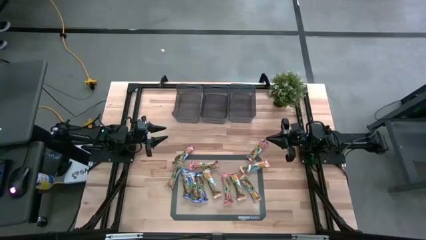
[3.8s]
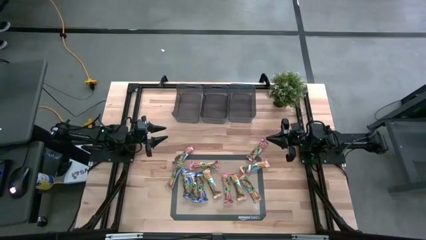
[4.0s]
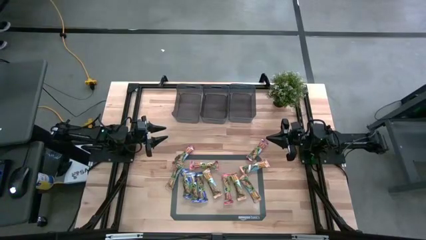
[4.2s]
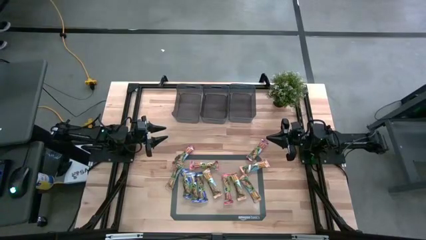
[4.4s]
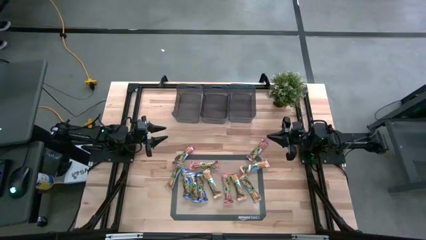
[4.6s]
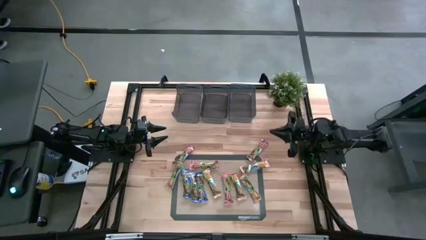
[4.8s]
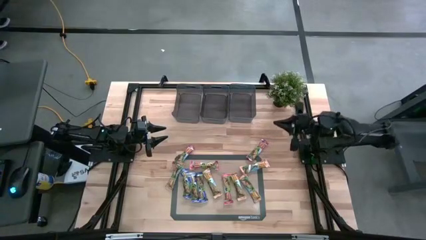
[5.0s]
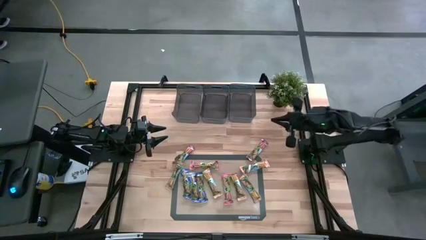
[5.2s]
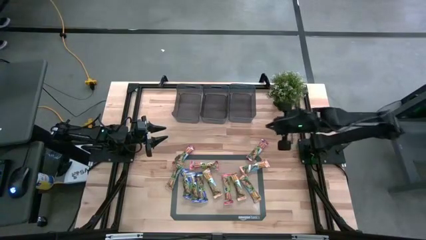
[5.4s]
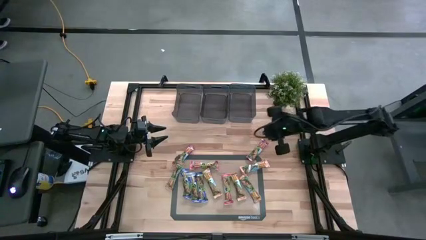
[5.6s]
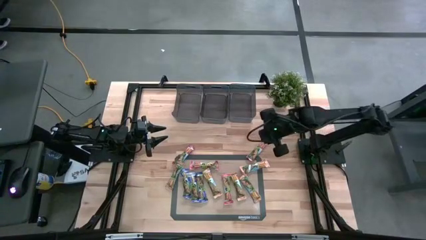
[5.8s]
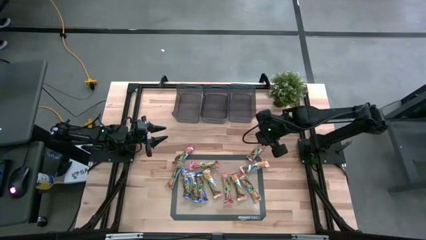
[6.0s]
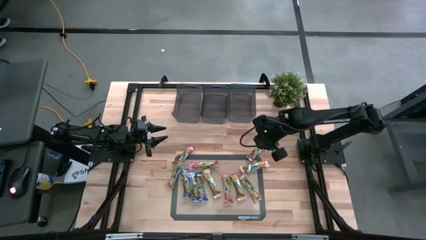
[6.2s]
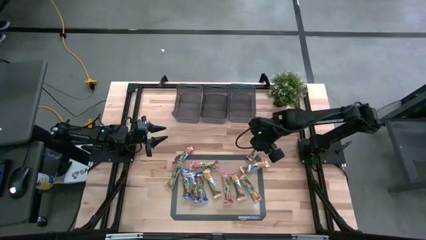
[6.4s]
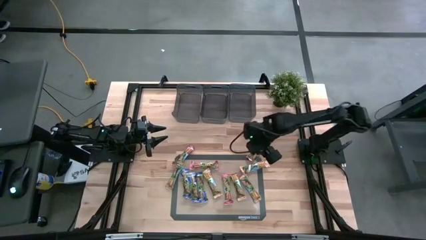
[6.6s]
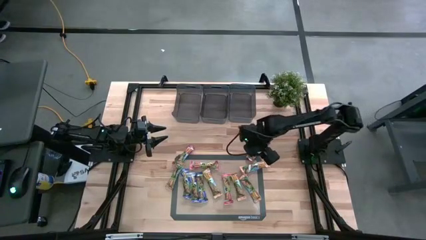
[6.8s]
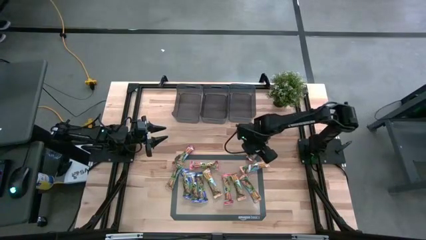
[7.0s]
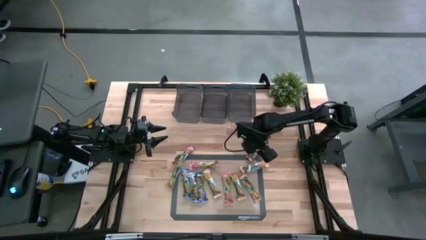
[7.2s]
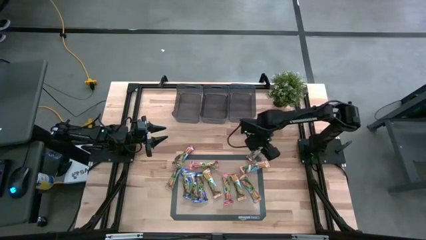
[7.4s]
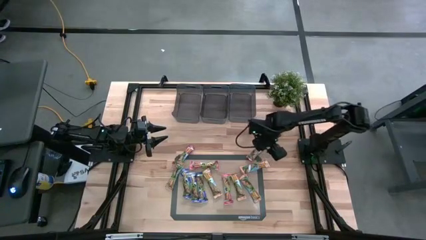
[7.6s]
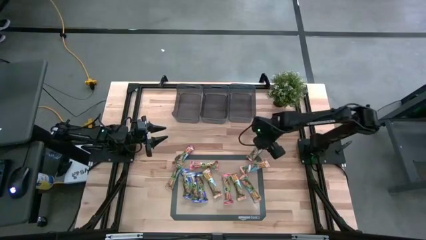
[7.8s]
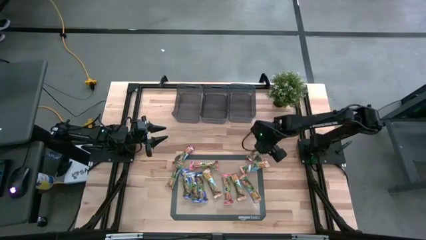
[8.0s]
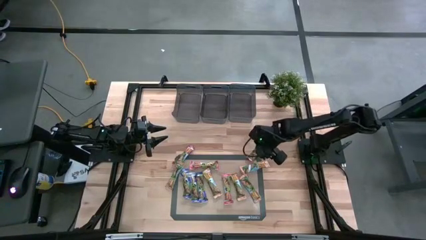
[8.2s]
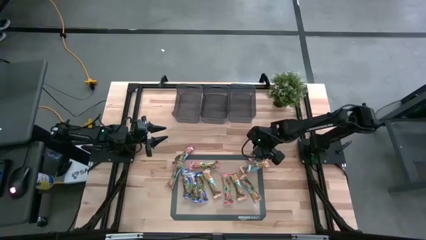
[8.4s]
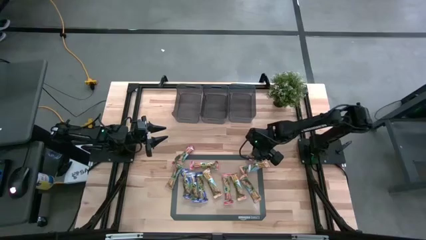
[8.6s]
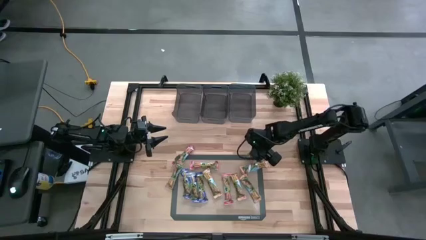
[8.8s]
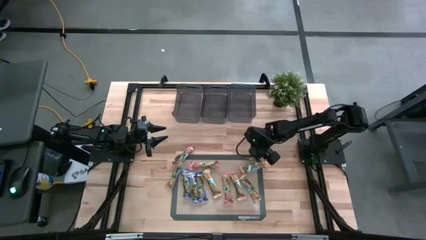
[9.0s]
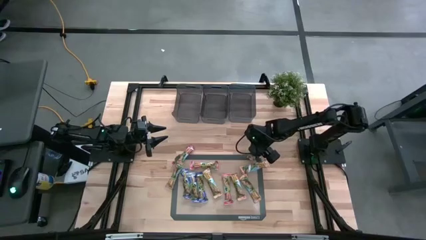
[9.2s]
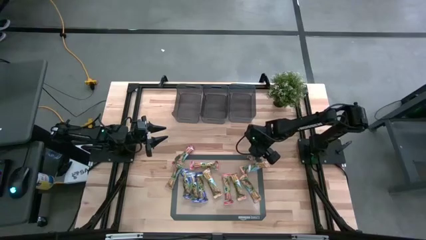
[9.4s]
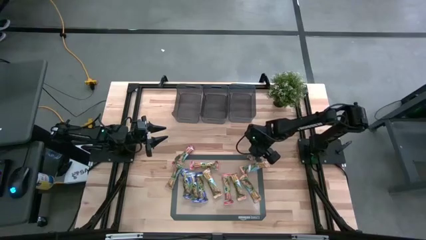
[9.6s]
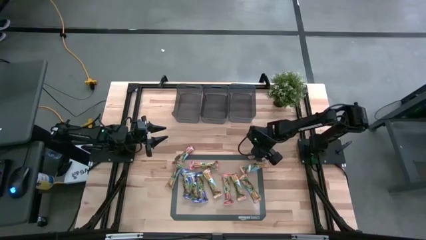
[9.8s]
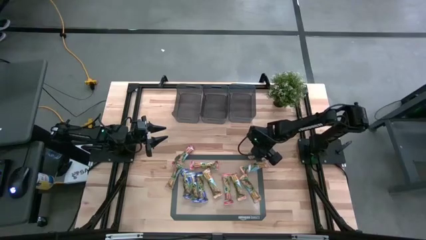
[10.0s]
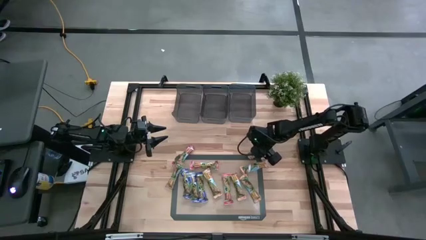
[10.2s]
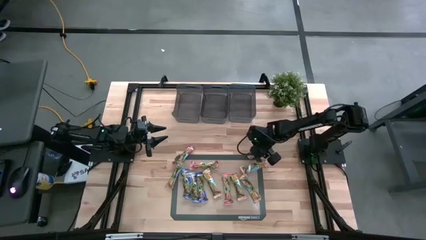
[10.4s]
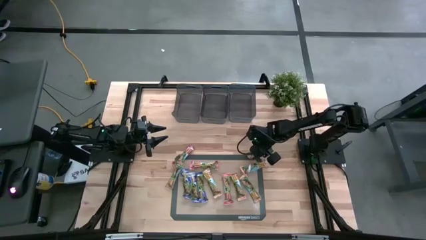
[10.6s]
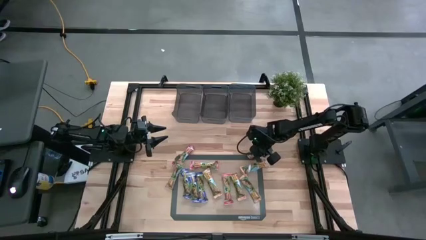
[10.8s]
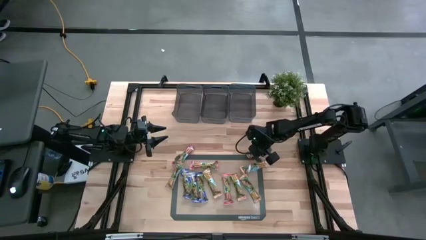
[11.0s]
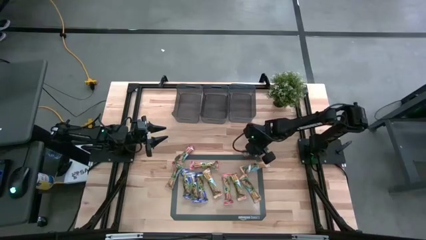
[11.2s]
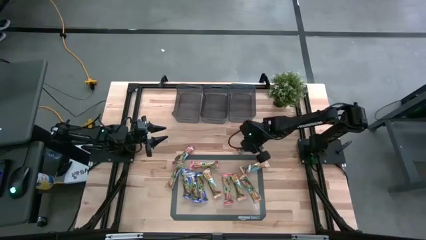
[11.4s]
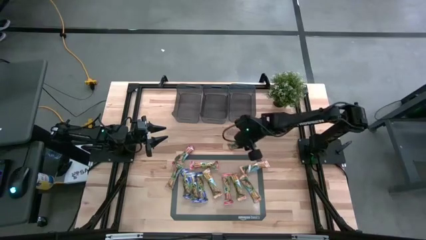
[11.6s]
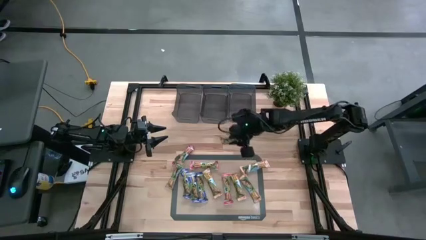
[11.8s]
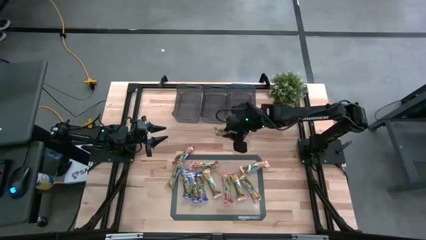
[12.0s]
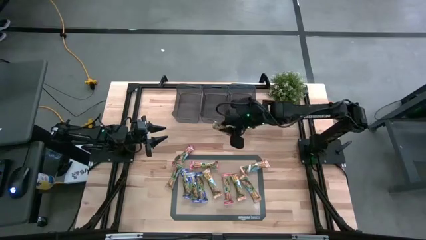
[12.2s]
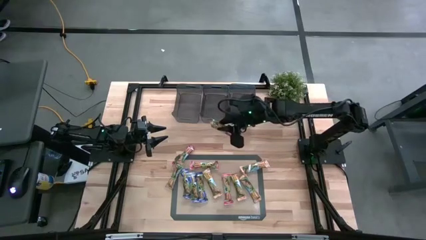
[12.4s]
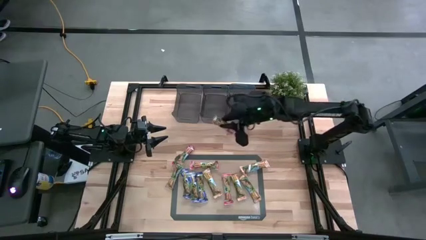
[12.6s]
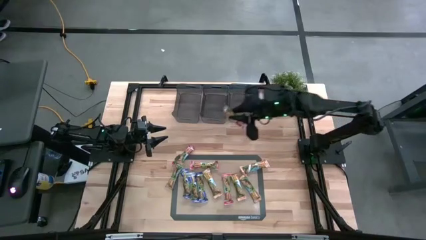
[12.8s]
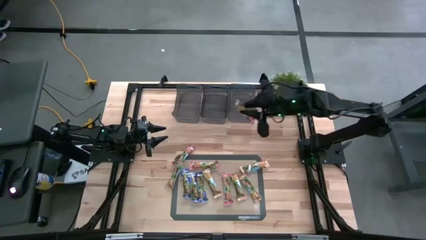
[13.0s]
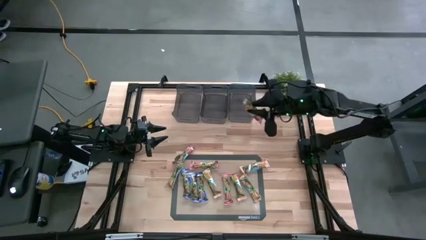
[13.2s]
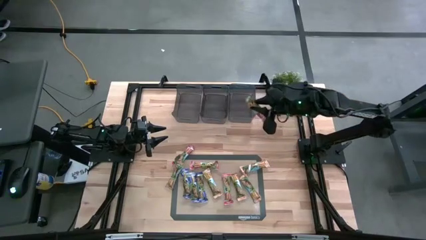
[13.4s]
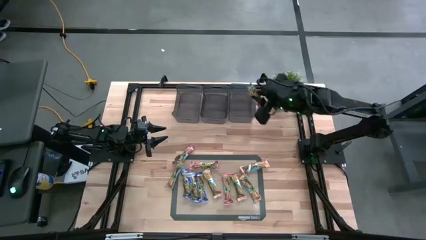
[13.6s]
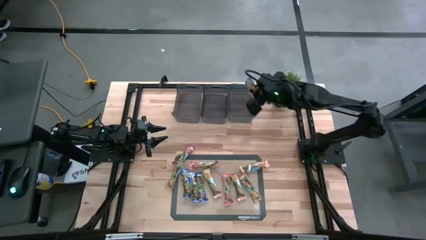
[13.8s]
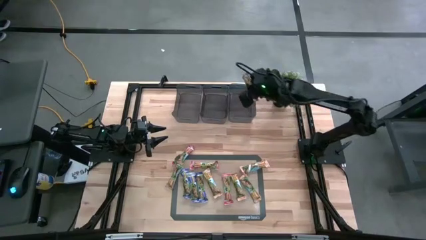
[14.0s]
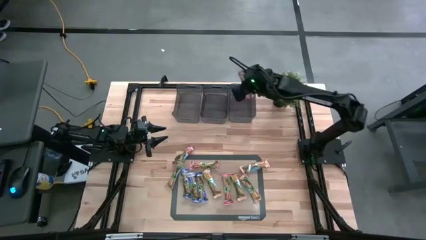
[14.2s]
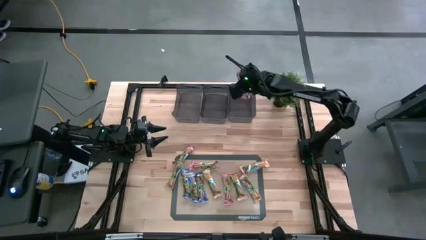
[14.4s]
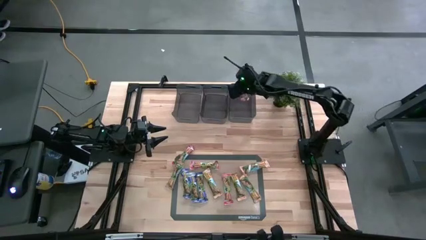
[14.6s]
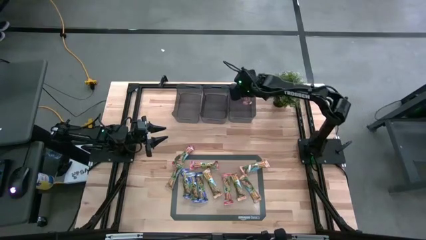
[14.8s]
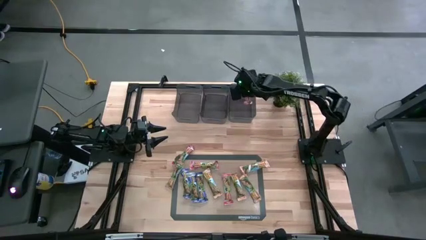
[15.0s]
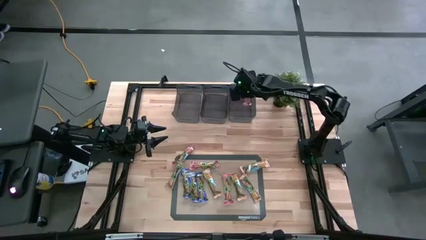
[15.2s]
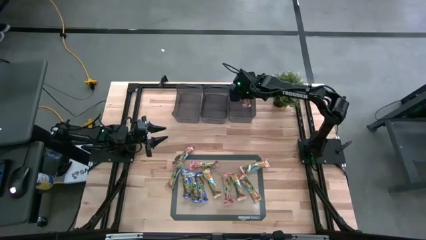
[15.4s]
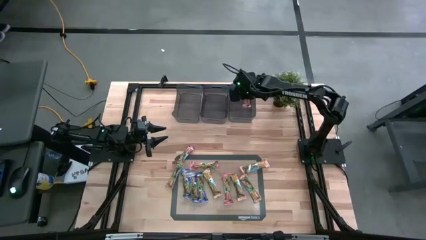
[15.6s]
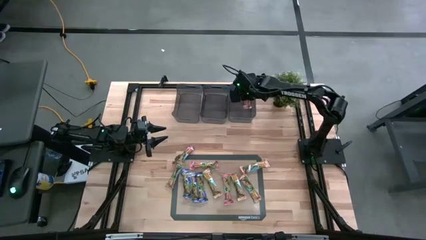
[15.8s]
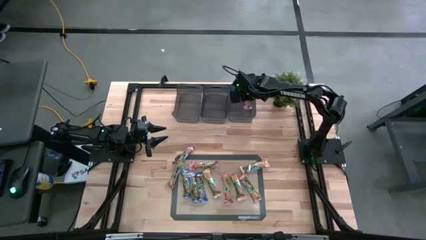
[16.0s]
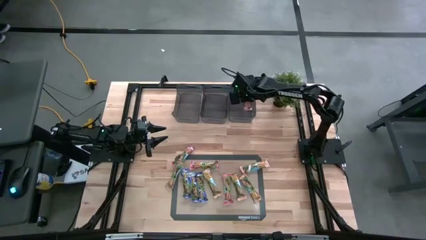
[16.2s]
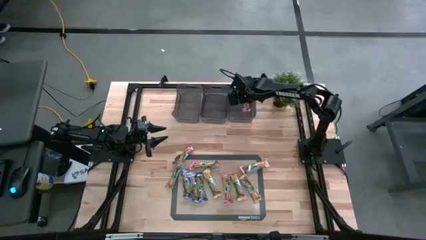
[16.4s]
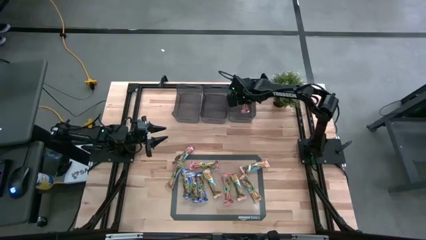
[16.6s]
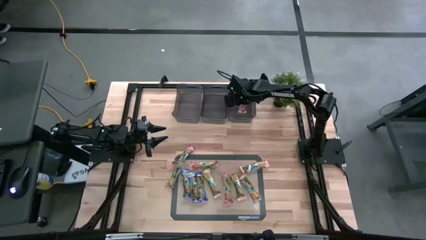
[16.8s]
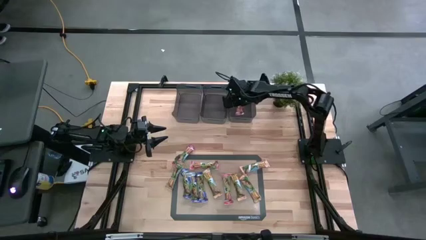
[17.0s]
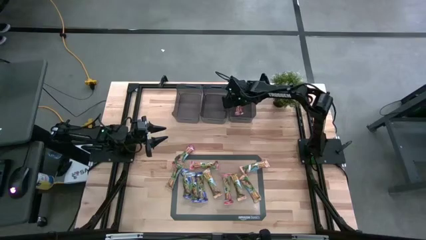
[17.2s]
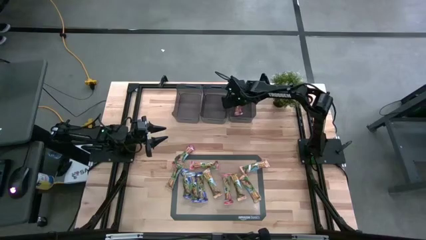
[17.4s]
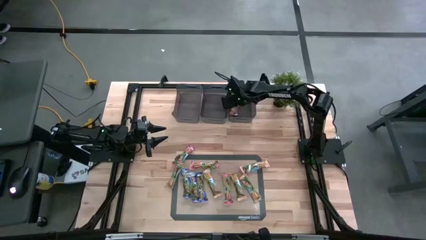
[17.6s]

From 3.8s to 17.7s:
Task: Pick and place Granola Bars by type
Put the red granola bar into the right black bin
